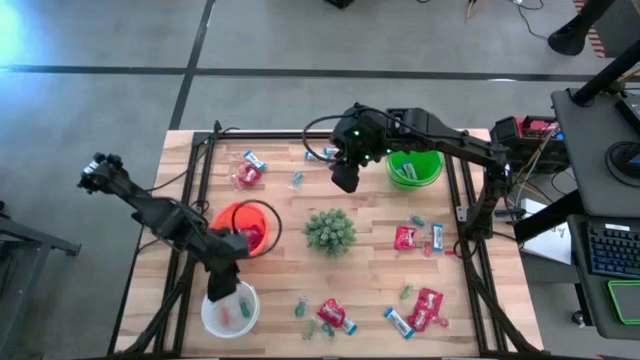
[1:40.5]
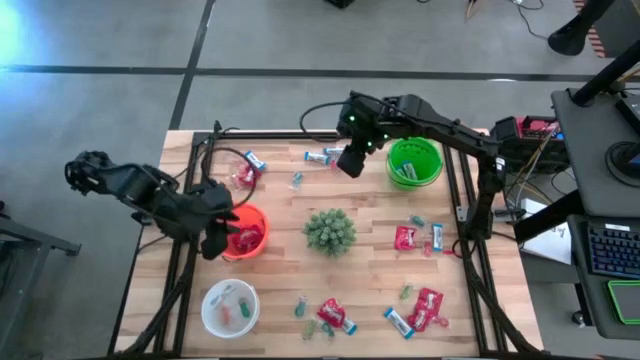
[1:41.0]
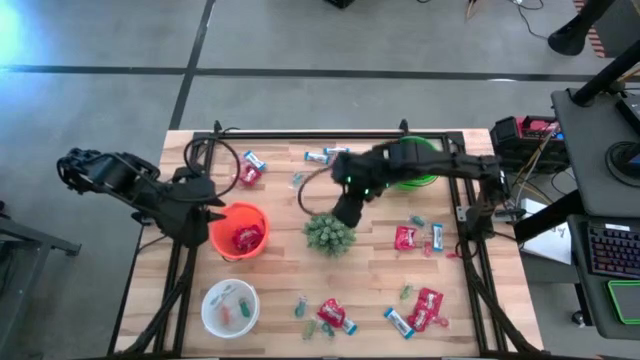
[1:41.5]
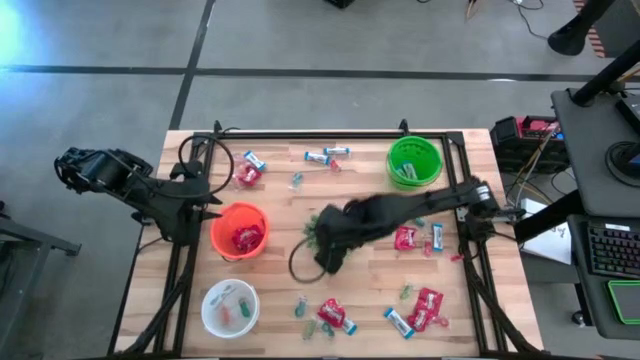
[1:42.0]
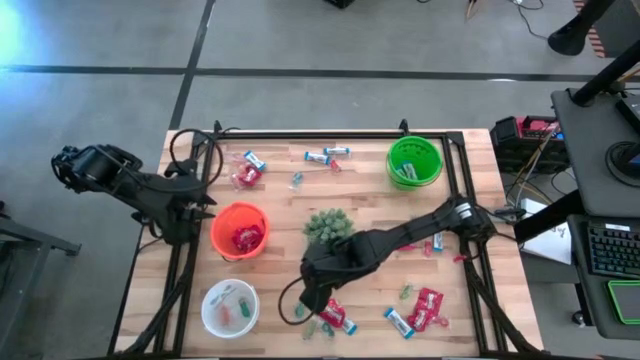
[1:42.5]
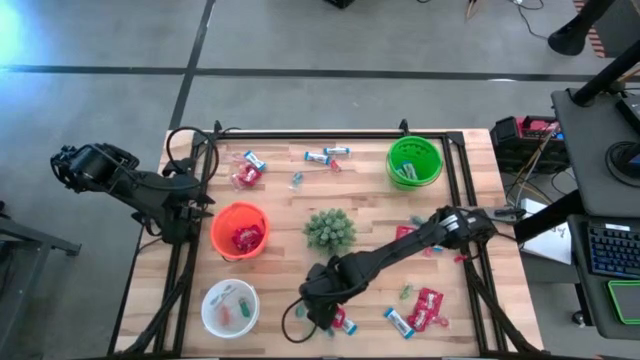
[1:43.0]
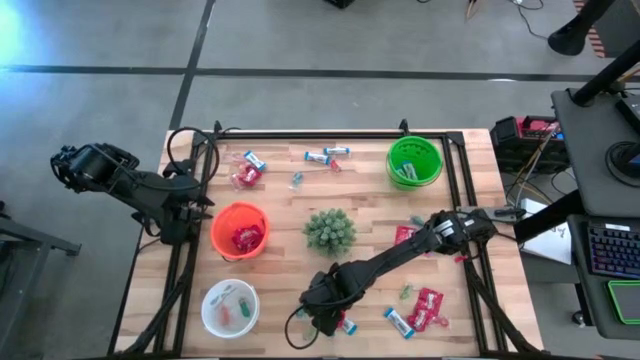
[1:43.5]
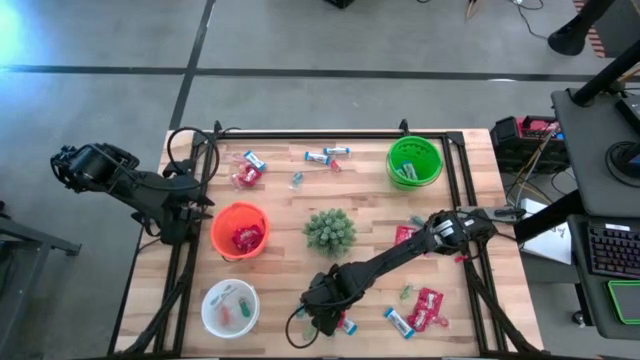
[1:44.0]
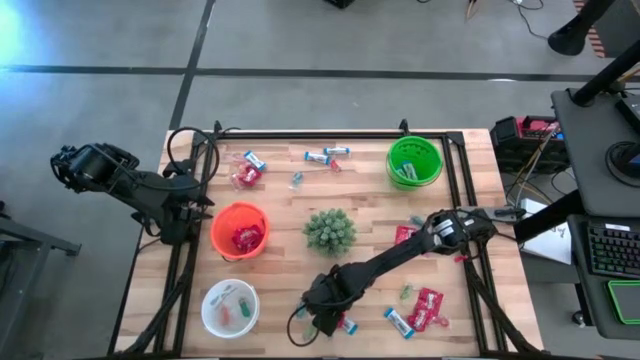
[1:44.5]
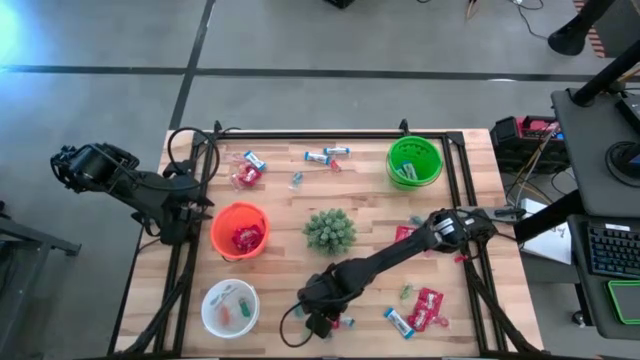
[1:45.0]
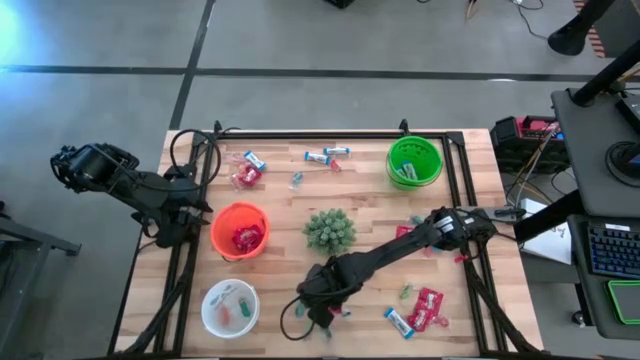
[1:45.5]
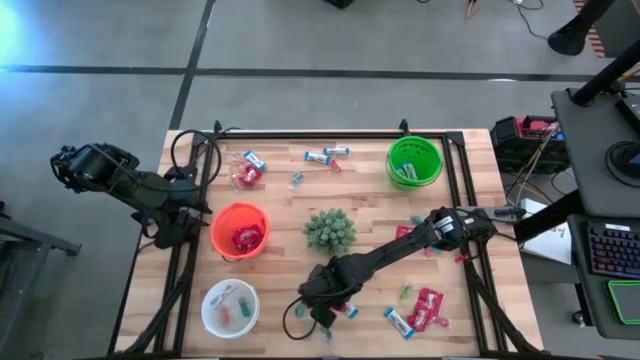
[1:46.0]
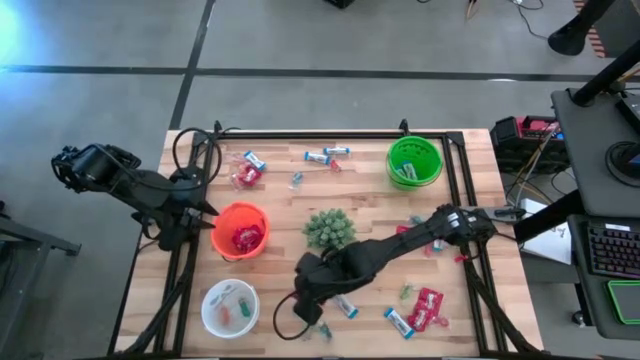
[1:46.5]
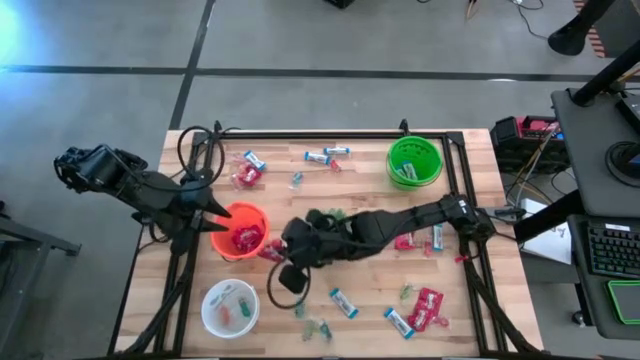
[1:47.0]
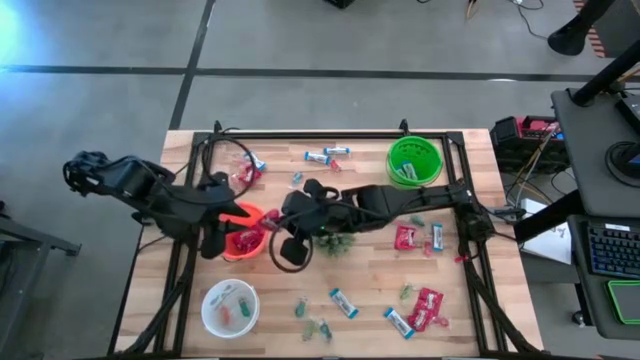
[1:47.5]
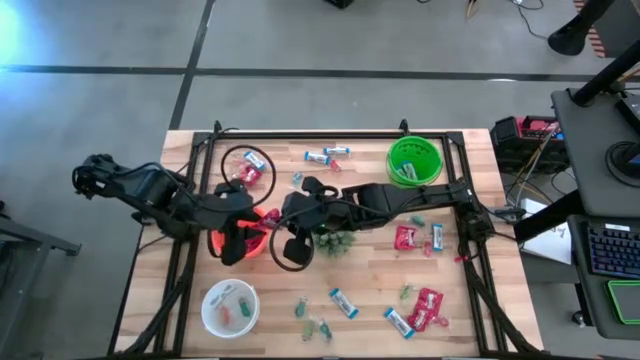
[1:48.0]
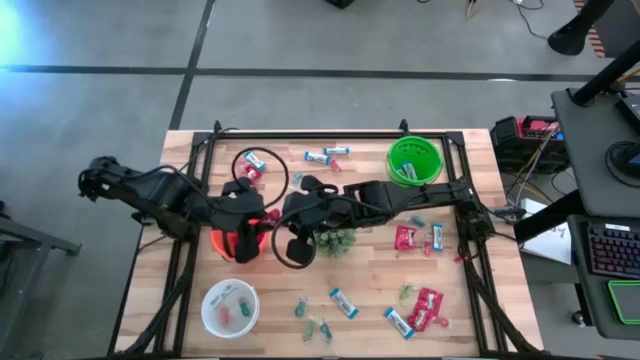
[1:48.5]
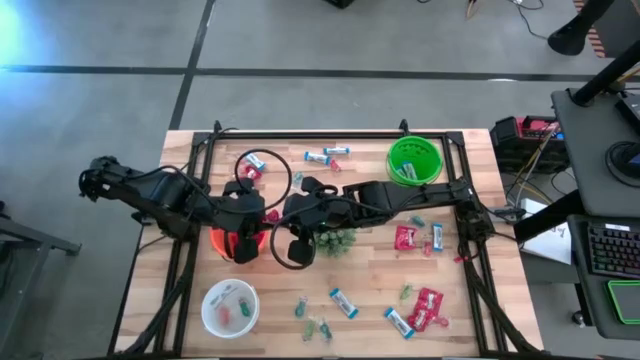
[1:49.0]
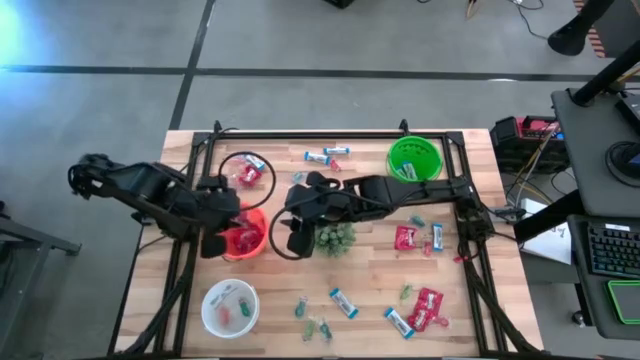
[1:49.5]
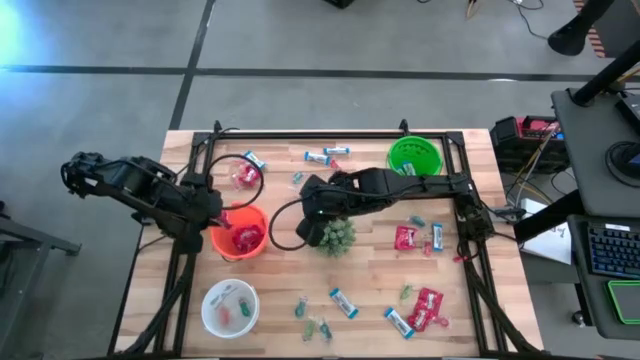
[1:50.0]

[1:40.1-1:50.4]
Task: Sort candy
Put the red candy into the orange bucket

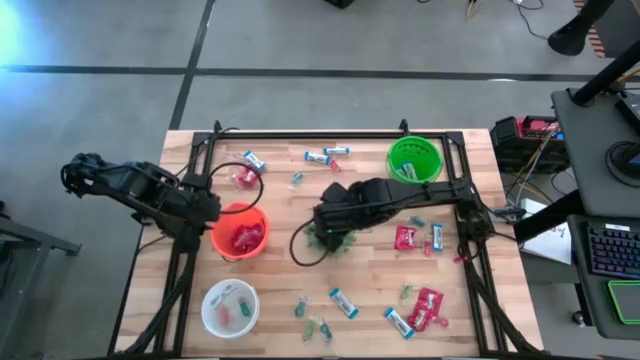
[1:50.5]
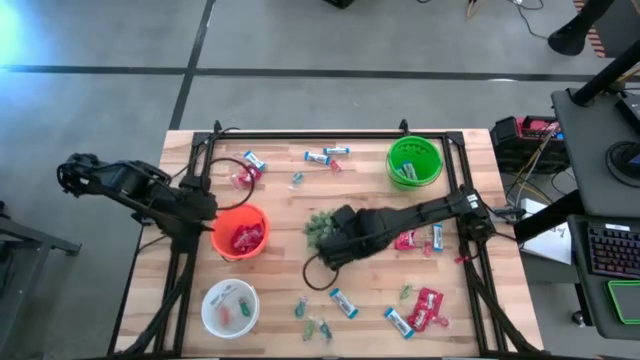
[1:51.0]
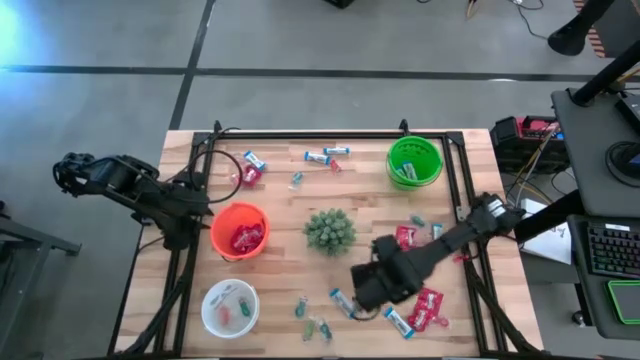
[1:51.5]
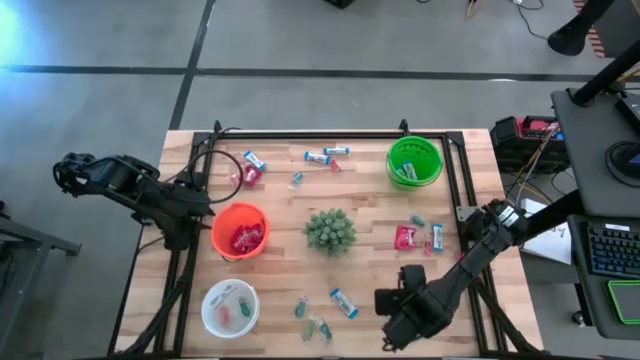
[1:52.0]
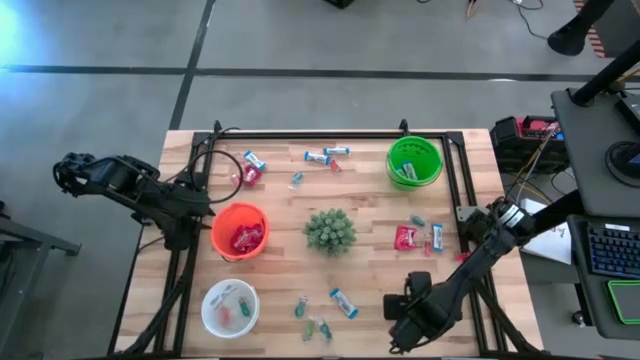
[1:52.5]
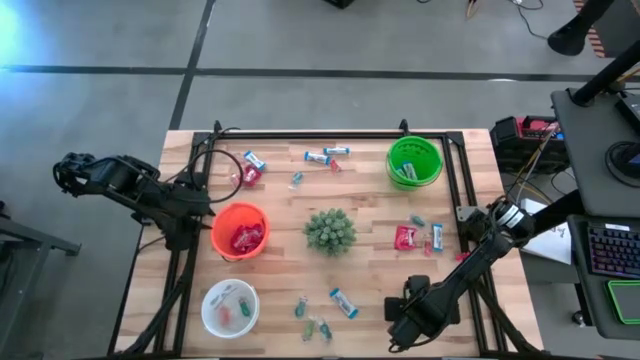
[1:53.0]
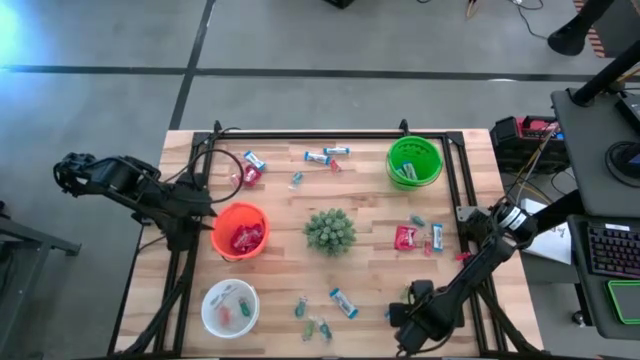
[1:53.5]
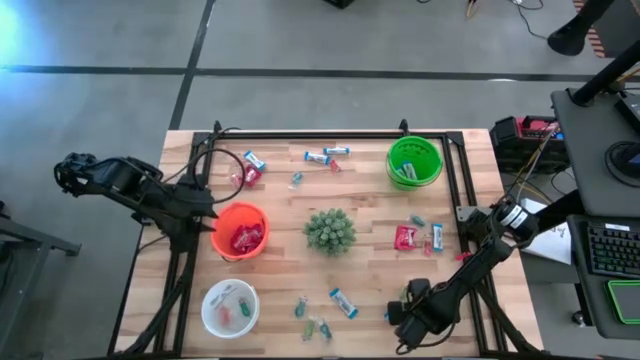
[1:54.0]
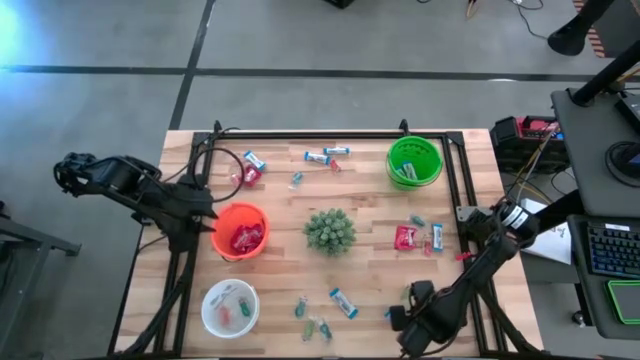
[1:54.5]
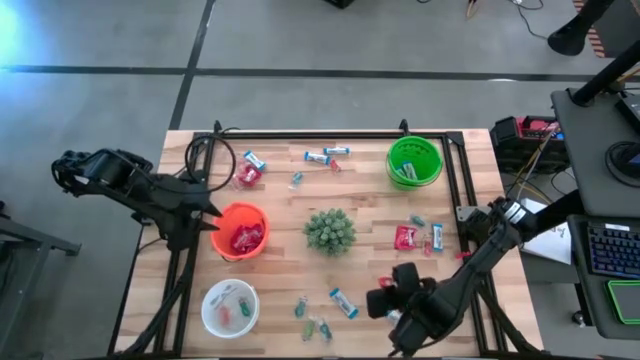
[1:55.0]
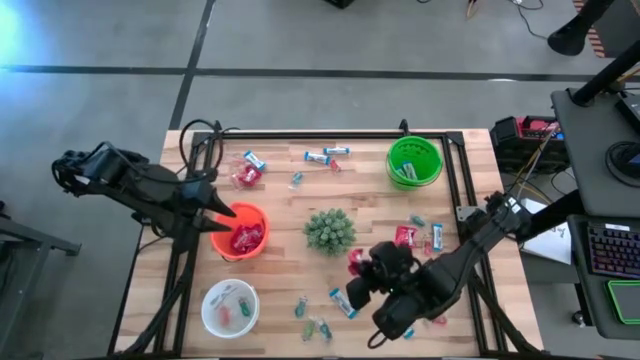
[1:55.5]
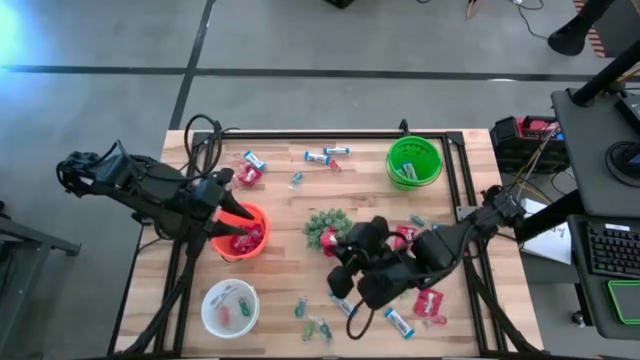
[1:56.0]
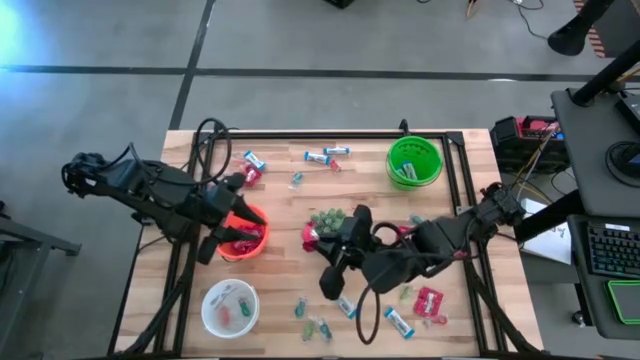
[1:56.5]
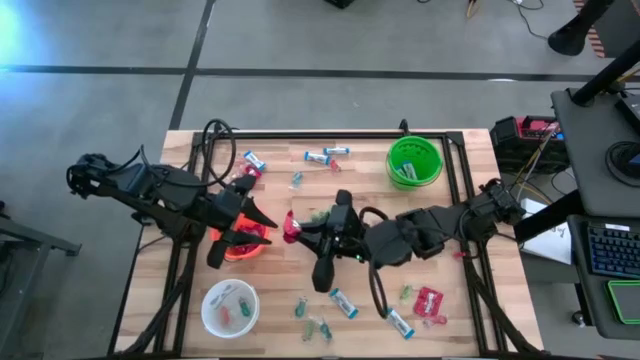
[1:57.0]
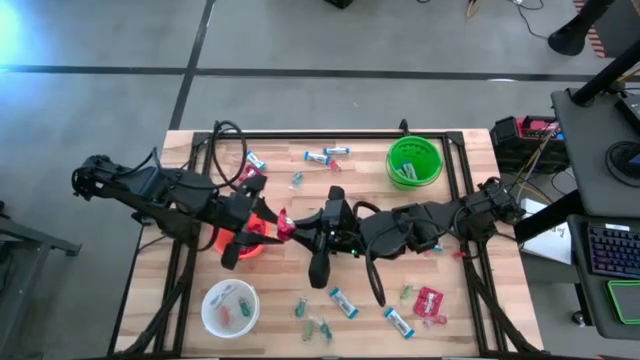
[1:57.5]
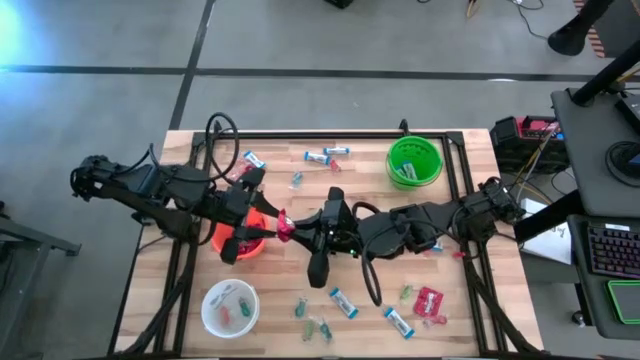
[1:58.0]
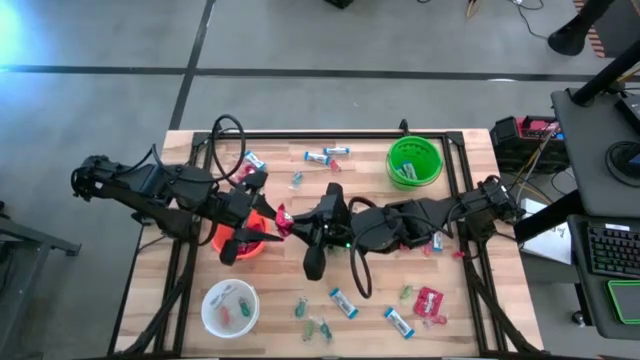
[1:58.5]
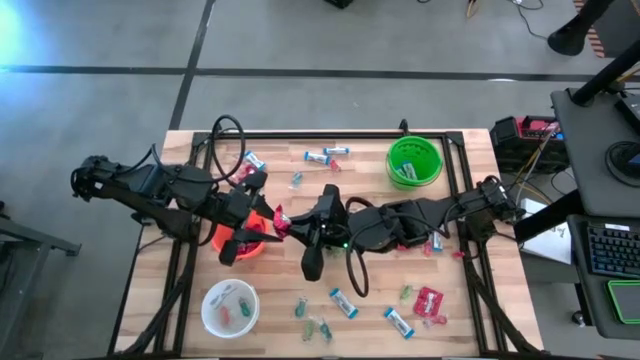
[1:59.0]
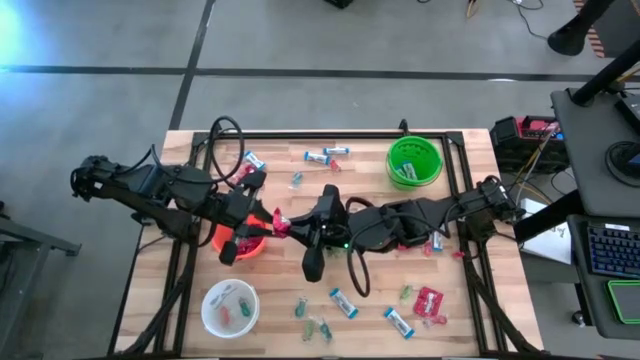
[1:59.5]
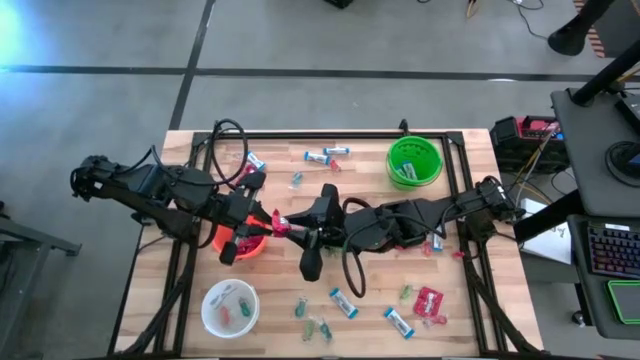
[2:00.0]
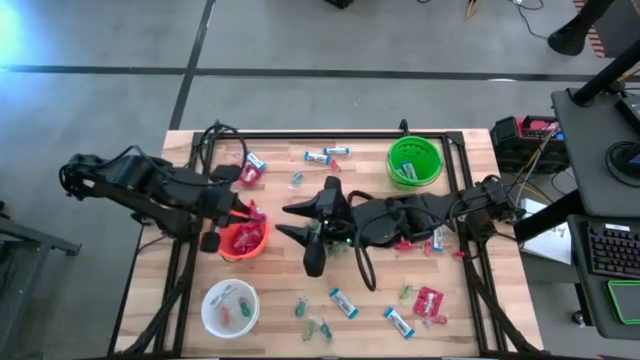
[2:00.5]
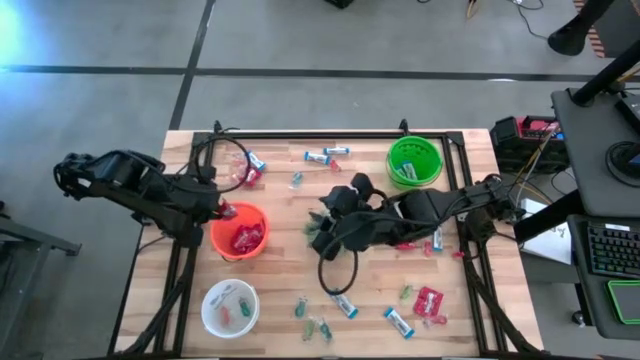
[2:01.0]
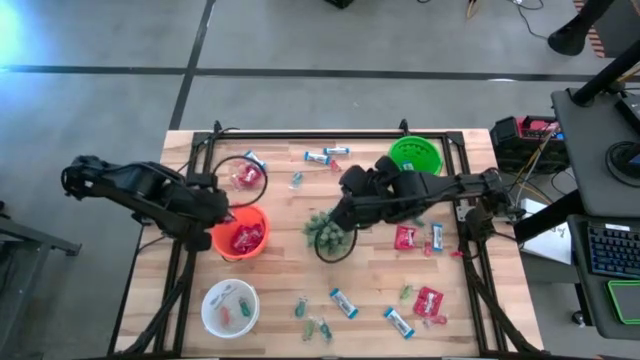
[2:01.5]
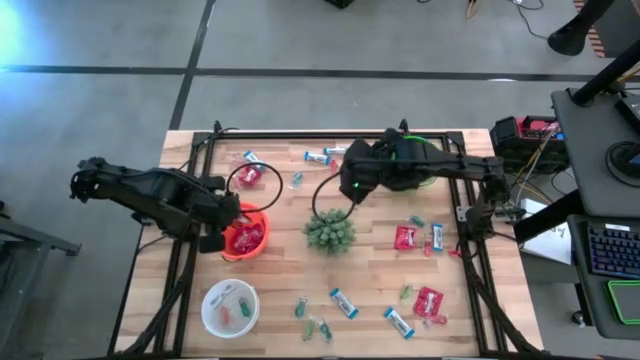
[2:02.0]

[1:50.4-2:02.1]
Put the red candy into the orange bucket
